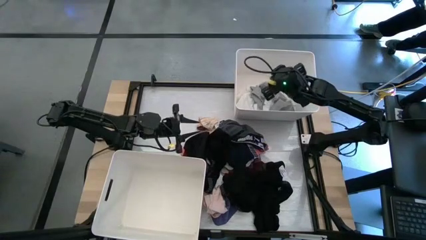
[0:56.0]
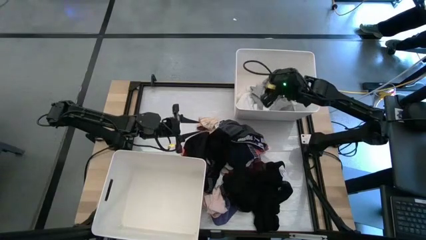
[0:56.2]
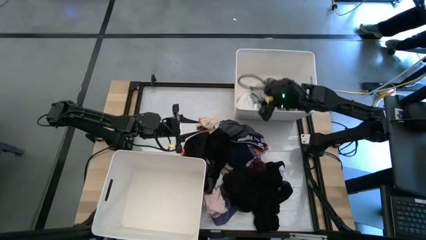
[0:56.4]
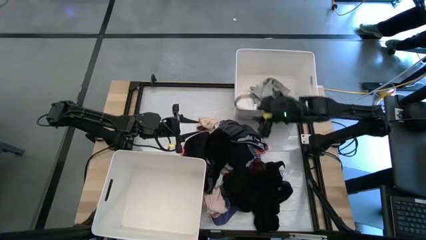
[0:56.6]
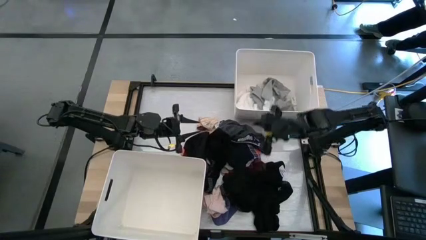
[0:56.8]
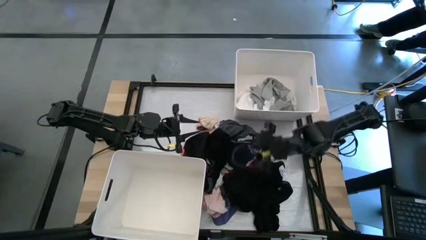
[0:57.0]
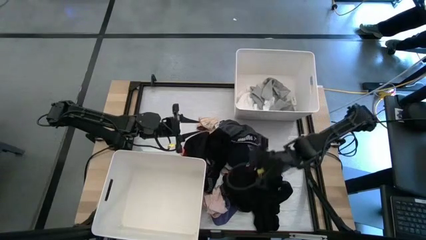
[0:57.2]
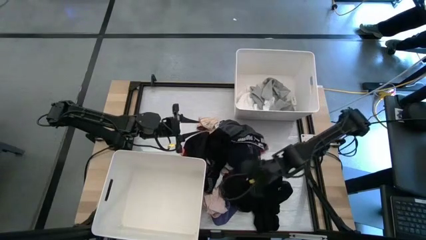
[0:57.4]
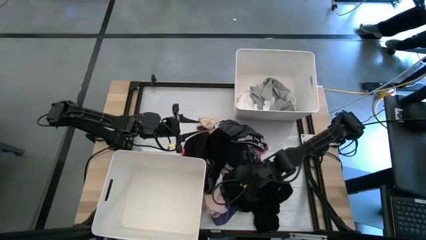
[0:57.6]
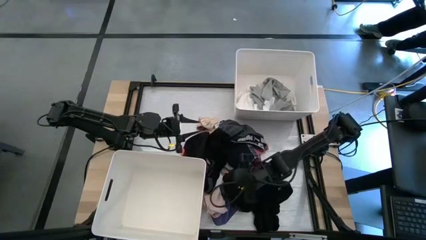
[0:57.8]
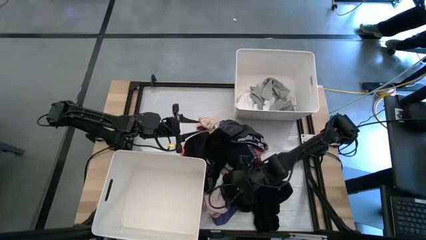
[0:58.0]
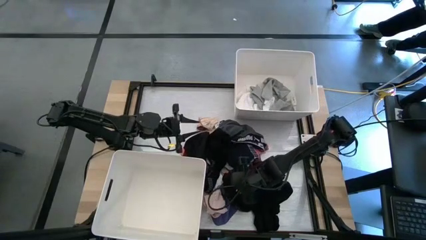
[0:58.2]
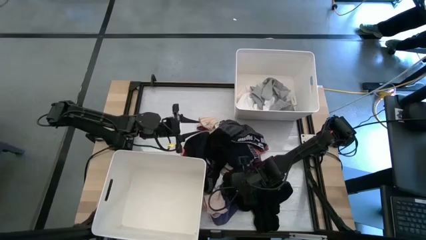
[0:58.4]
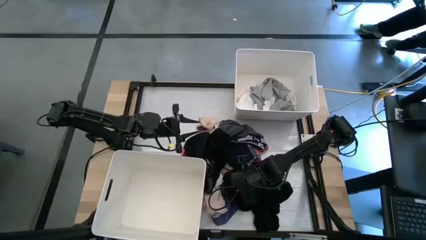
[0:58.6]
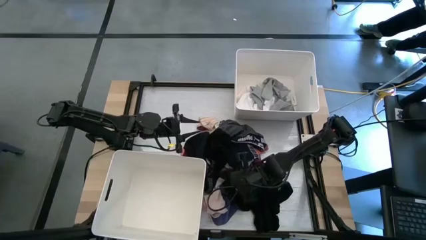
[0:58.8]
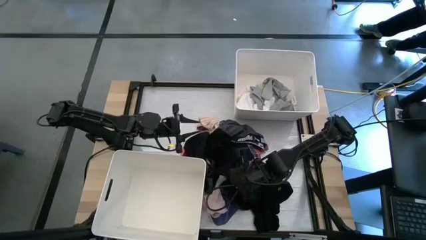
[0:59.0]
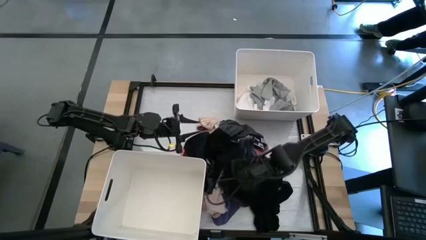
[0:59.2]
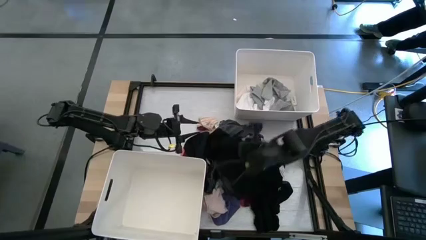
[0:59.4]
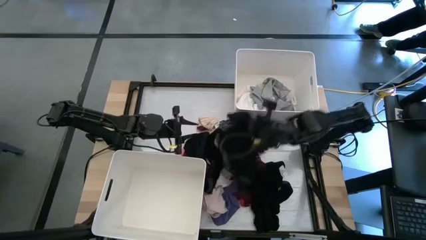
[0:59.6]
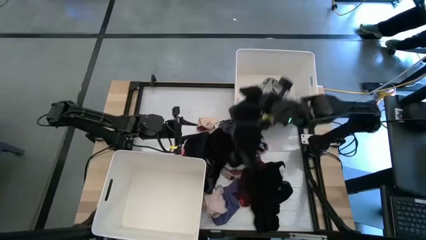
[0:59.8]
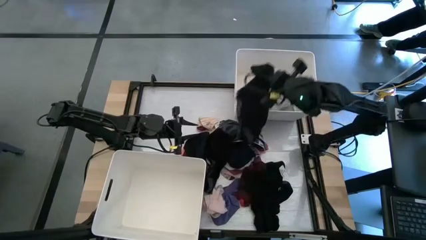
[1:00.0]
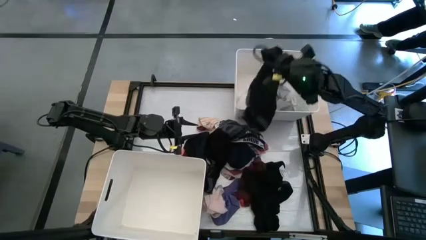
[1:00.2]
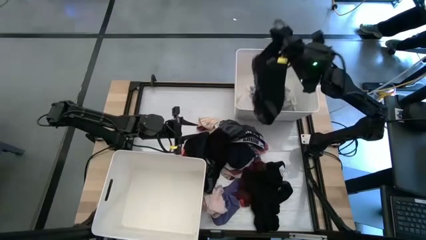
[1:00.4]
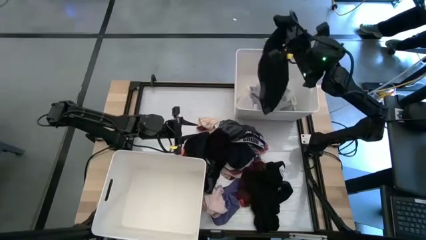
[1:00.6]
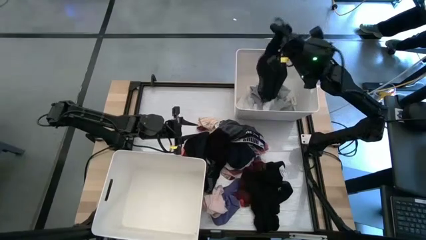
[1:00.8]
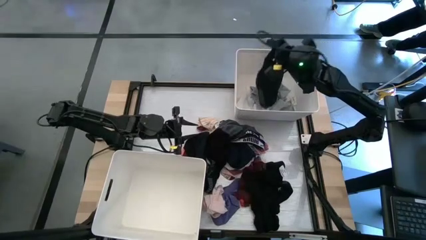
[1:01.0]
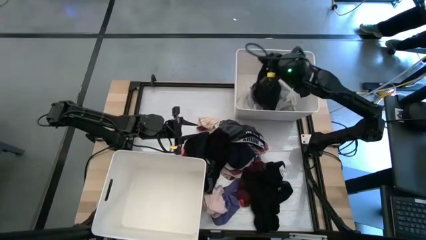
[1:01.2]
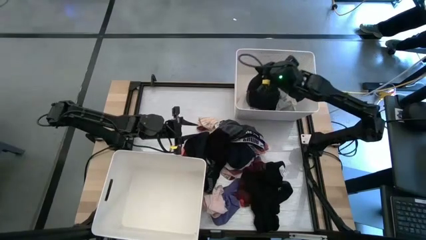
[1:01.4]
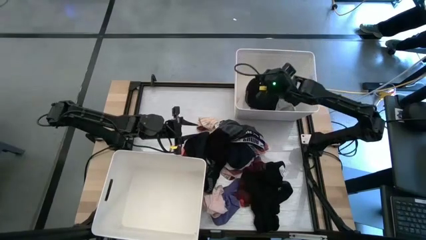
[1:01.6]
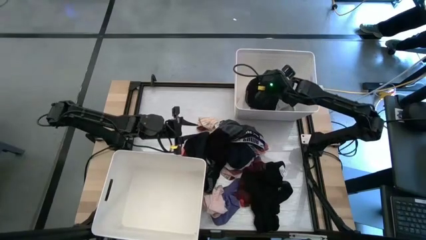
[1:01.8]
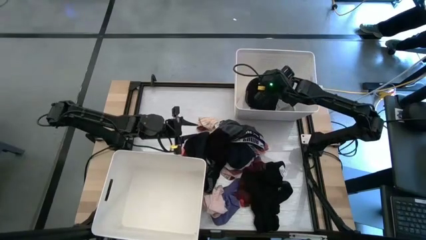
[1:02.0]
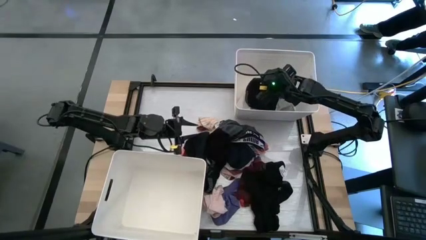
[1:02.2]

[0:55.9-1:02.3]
Task: Sort clothes
Put the black underwear into the top white laundry bin

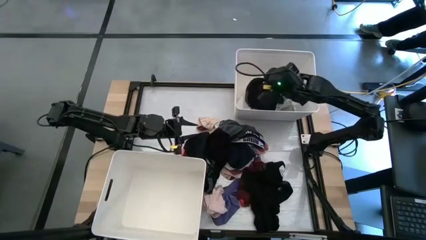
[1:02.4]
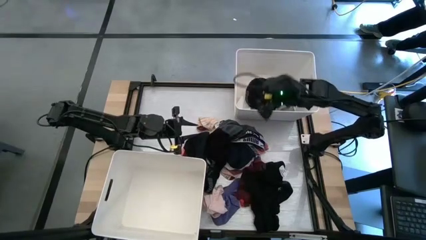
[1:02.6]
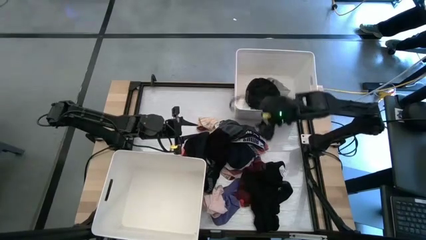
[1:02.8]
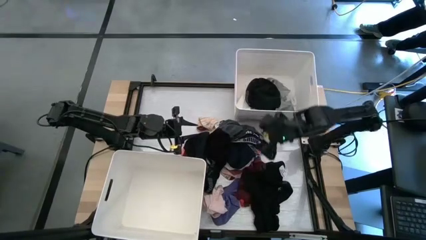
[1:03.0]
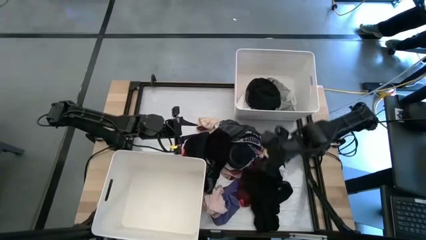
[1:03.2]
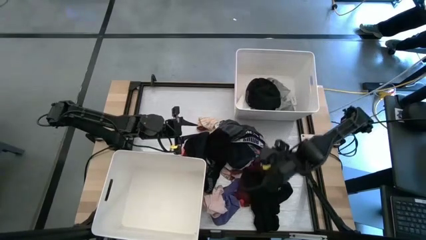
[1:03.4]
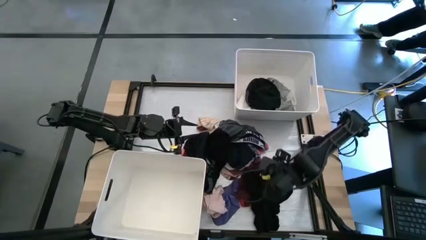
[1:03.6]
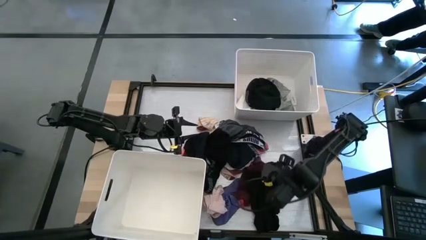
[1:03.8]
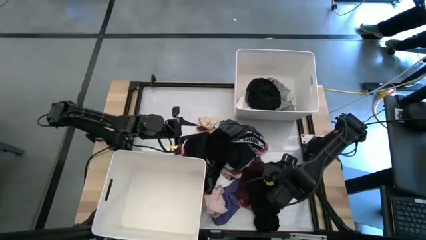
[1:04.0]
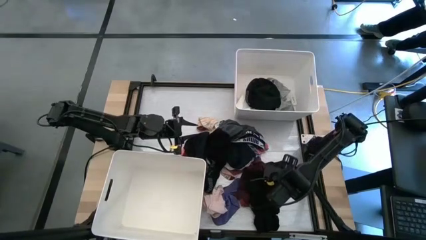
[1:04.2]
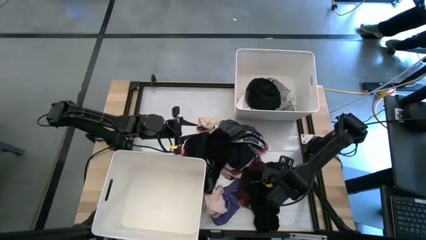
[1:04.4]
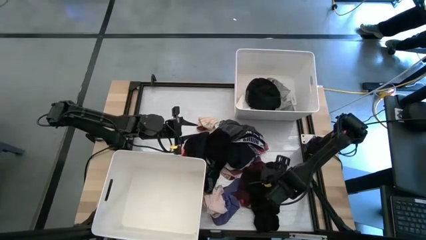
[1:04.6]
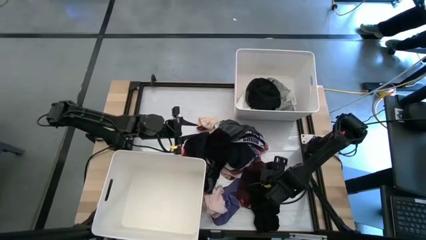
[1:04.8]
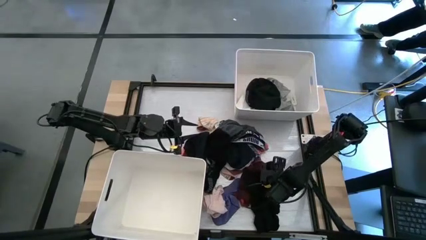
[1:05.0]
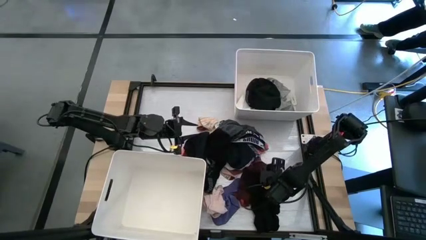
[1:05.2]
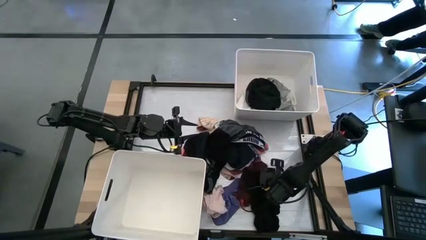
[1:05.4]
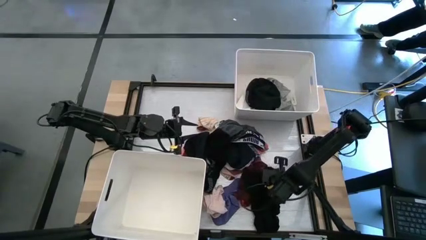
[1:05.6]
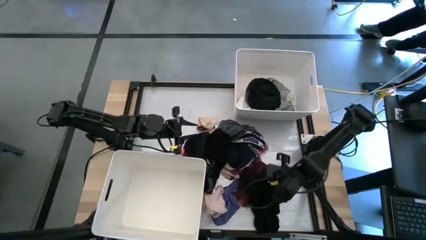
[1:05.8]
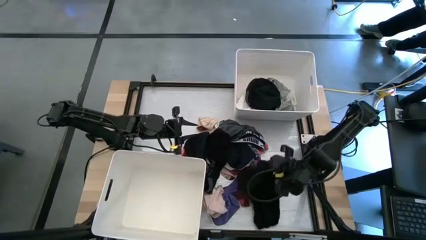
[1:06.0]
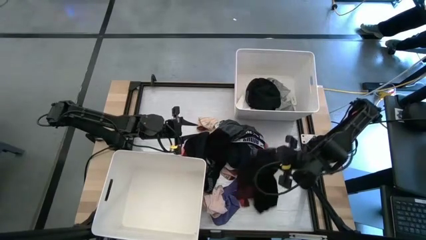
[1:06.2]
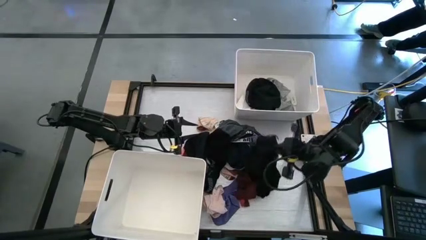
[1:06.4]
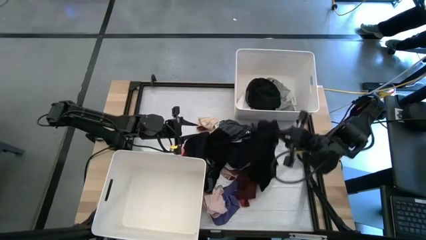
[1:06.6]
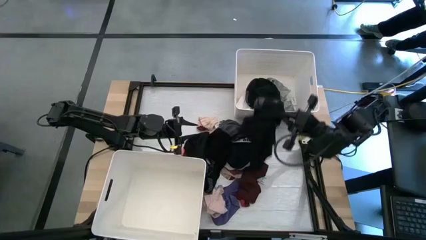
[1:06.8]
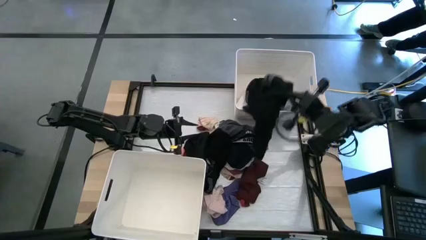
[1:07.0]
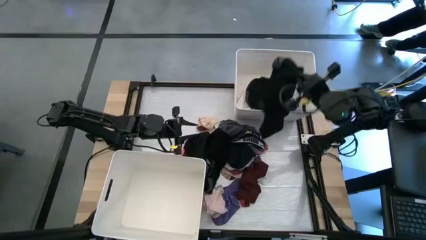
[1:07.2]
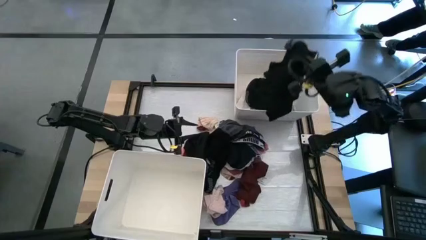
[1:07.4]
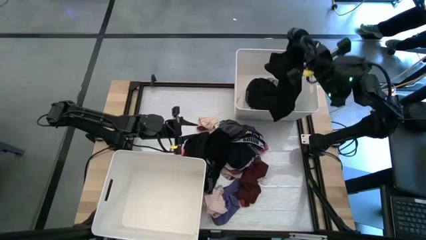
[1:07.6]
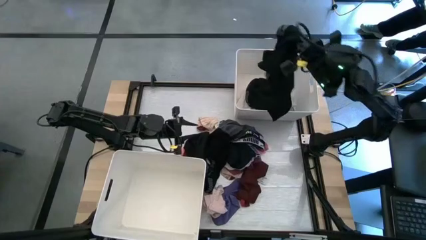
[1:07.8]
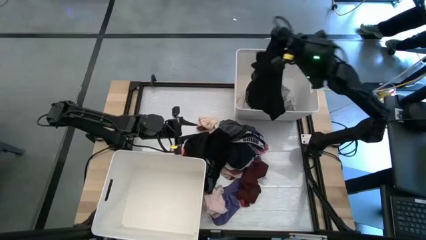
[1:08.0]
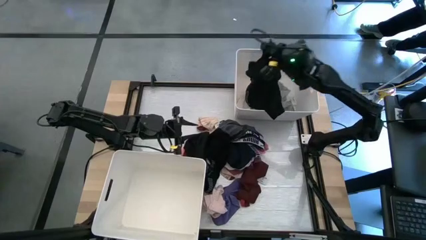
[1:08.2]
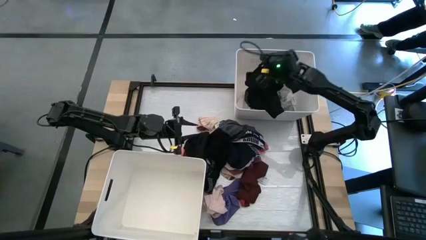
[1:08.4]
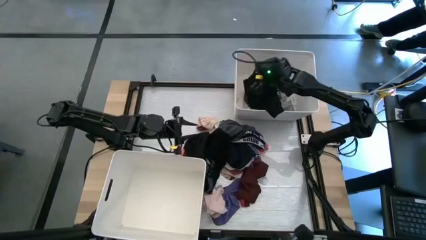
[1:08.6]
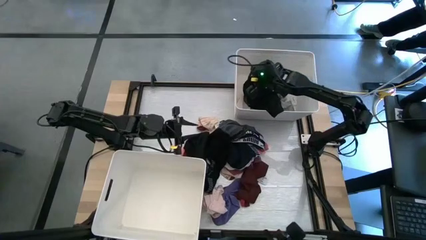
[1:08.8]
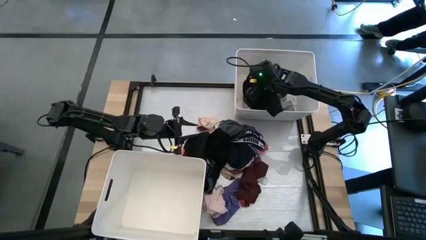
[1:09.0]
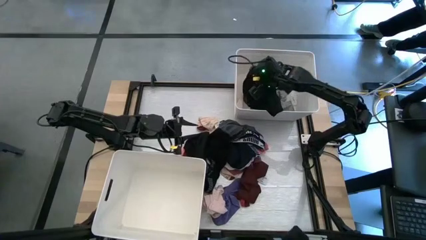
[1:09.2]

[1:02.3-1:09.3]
Put the black underwear into the top white laundry bin

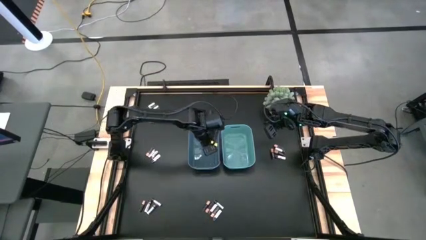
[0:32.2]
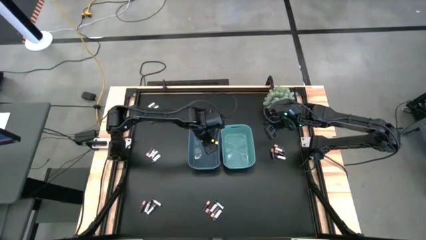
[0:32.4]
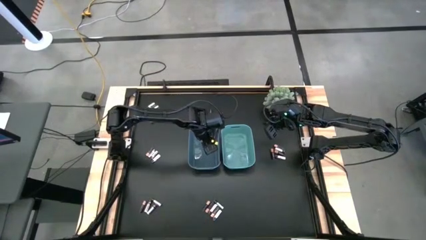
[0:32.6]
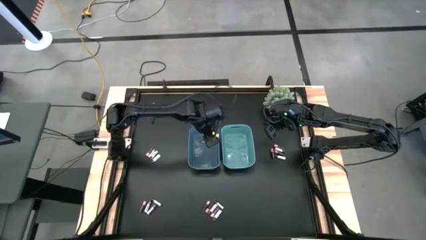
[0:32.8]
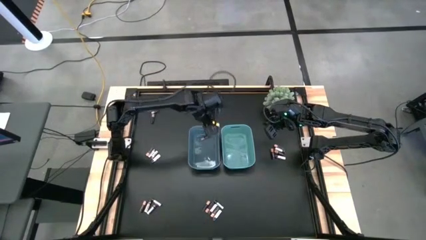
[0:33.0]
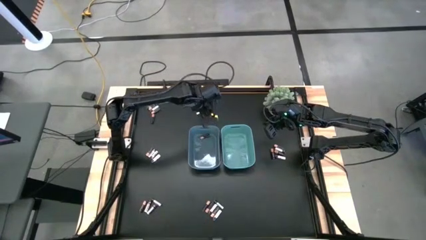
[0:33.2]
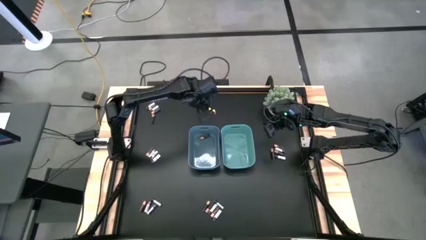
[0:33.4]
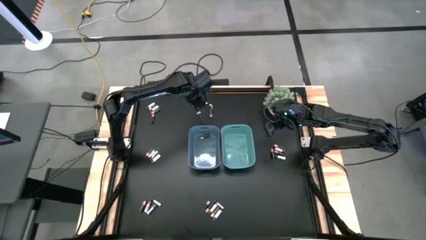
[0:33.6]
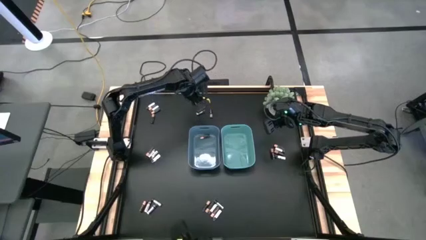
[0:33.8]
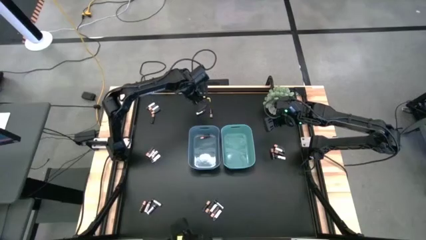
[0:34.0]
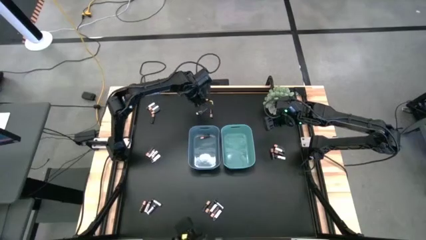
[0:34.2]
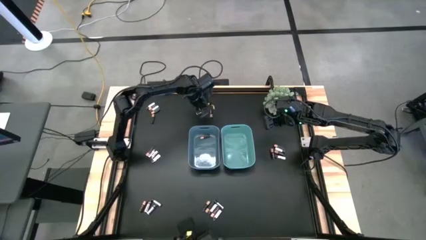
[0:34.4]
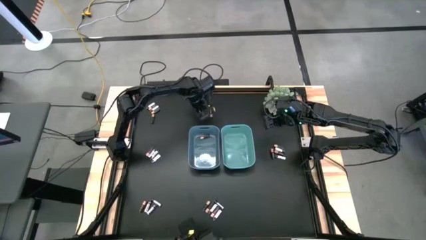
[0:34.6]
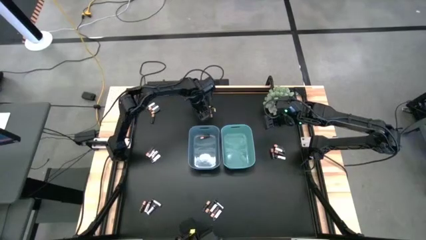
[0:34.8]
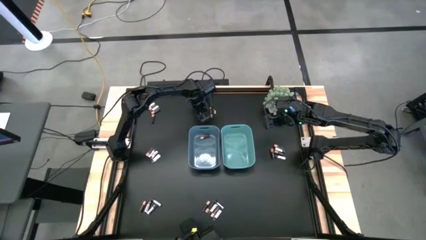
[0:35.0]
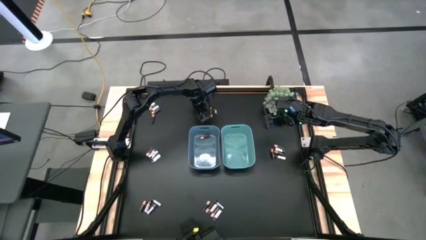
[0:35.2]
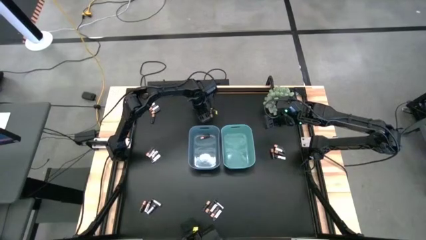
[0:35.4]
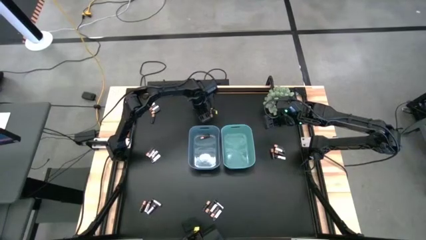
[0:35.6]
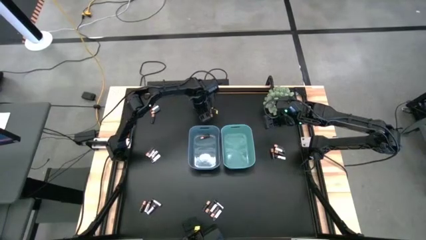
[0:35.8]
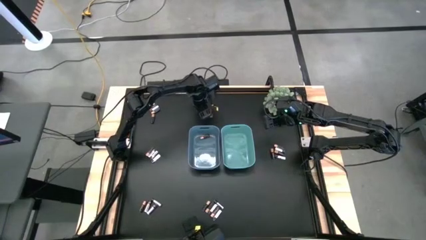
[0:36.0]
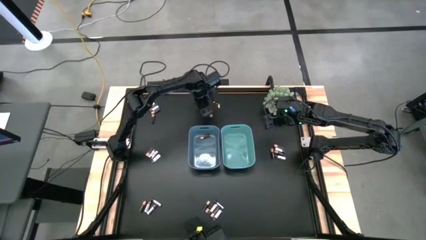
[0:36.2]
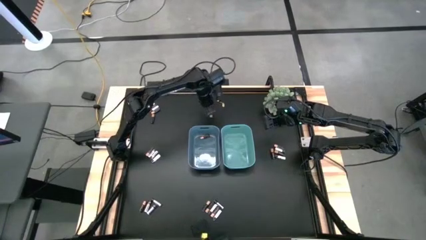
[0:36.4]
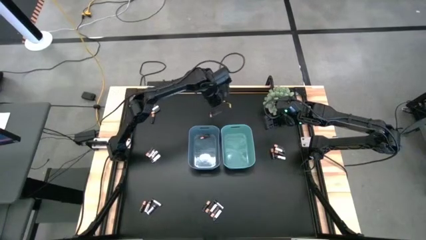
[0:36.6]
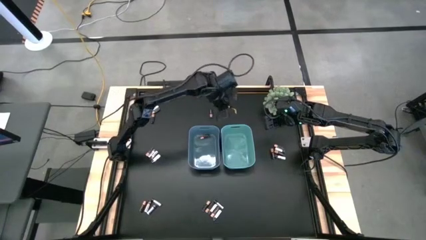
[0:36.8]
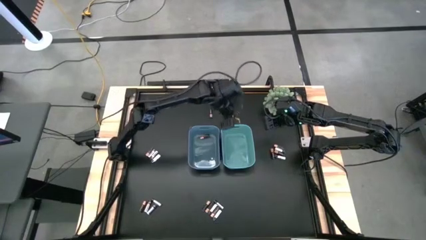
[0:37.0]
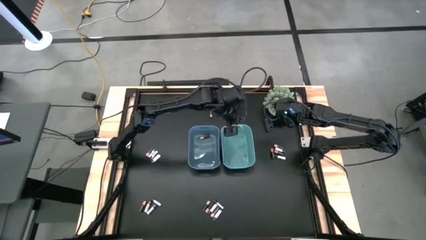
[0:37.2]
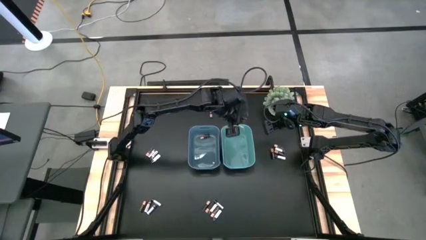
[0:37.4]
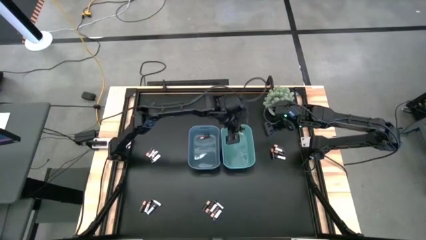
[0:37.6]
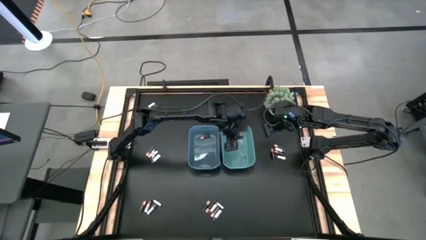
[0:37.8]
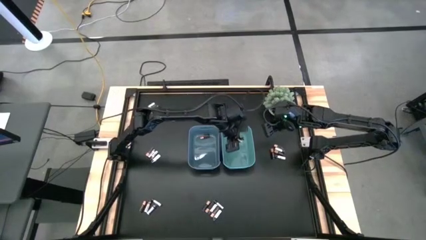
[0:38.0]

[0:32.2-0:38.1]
Task: Sort batteries
Put the white battery into the green bin
